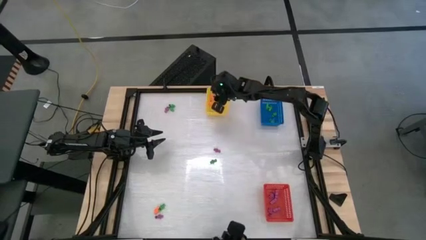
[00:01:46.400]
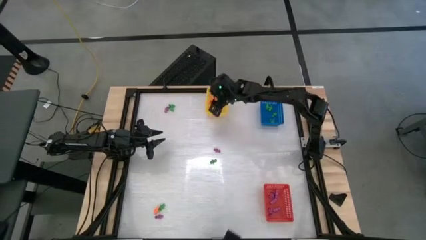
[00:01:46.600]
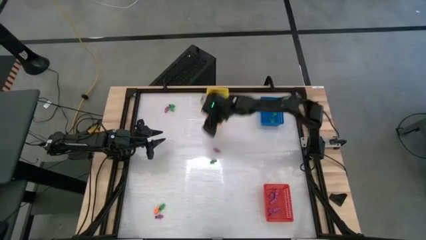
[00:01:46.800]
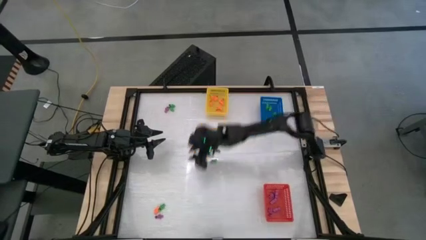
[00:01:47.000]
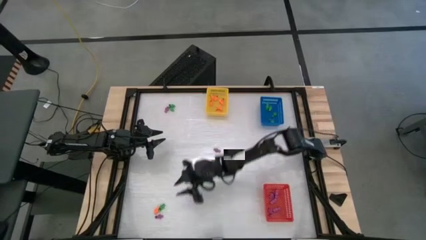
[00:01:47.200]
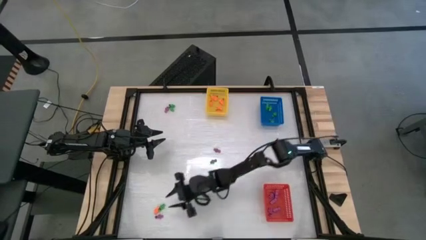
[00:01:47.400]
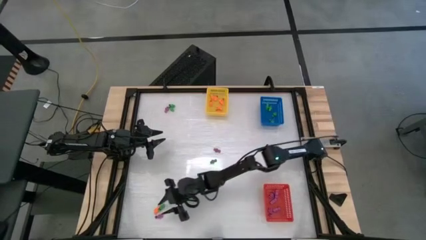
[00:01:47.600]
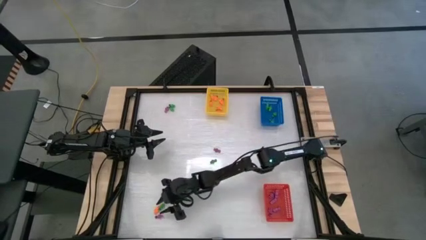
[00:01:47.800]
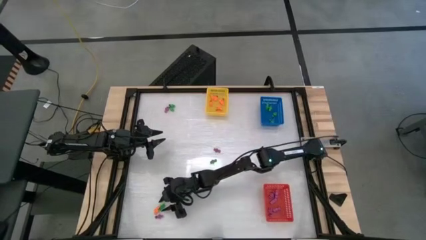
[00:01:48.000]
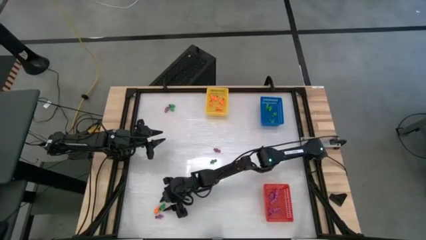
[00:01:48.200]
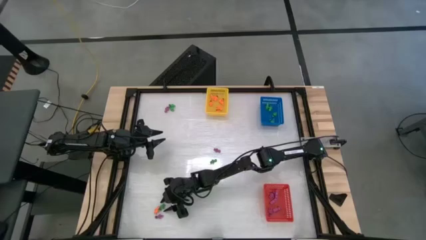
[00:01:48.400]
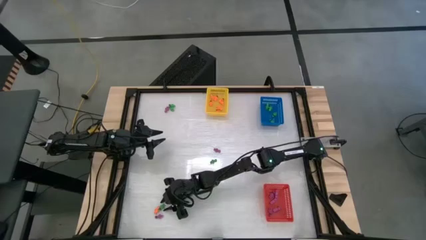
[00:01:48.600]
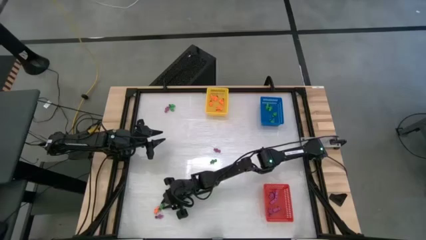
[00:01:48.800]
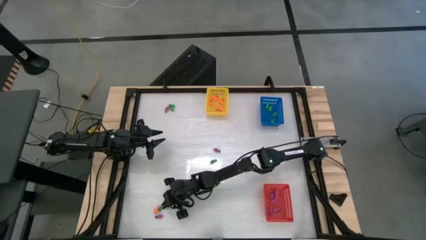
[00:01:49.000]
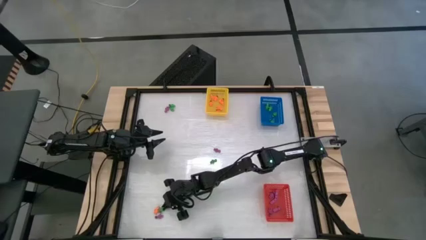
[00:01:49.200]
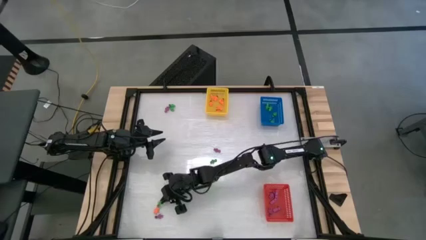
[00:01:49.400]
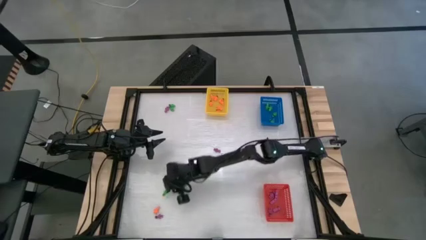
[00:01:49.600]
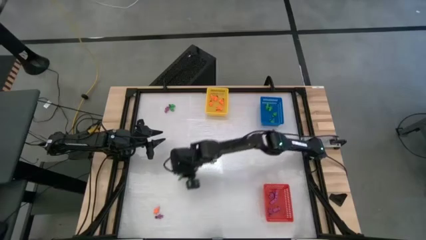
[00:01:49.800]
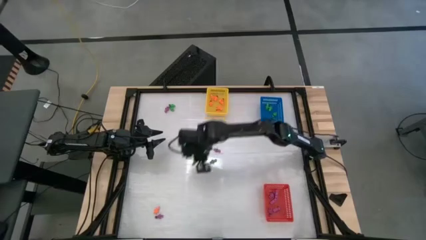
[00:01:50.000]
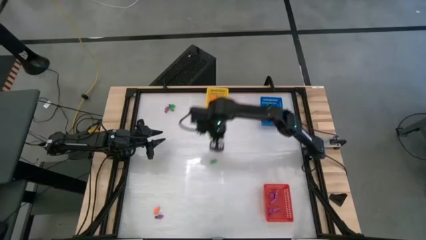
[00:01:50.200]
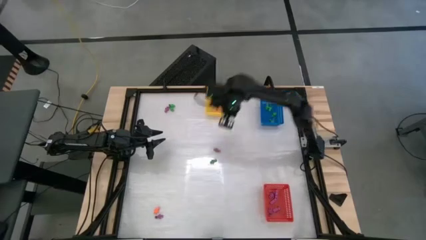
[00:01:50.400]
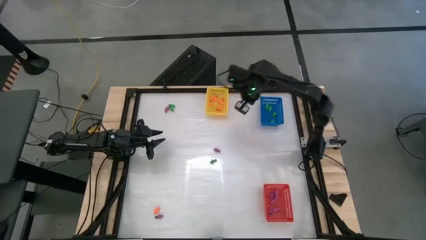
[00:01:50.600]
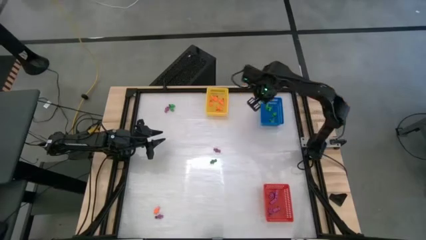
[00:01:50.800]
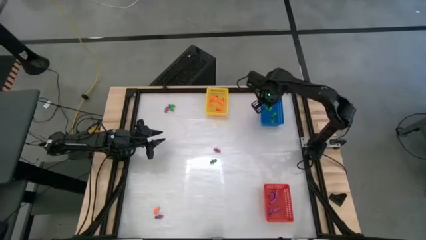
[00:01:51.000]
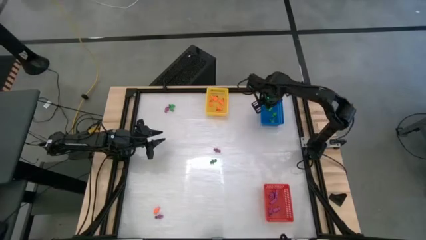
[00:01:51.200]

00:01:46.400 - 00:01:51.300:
Task: Sort Halloween decoration
Put the green skeleton toy into the blue bin

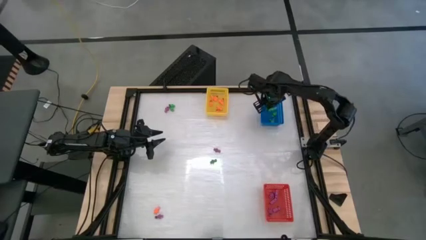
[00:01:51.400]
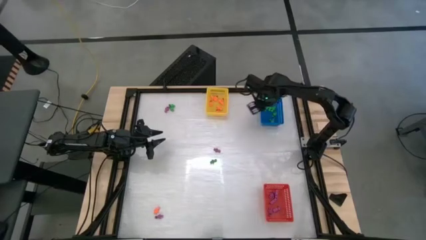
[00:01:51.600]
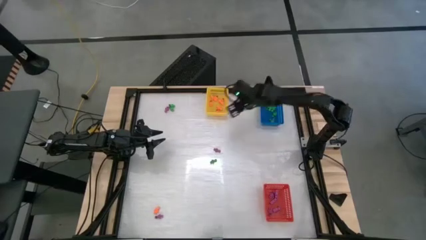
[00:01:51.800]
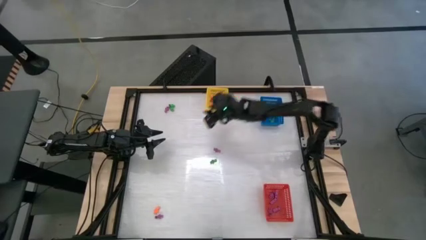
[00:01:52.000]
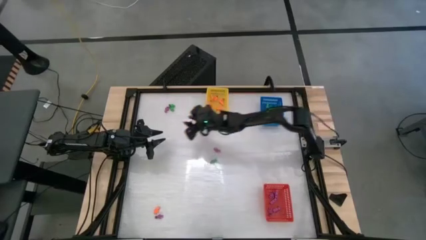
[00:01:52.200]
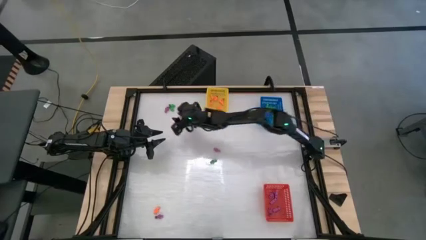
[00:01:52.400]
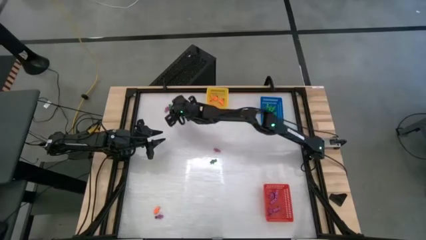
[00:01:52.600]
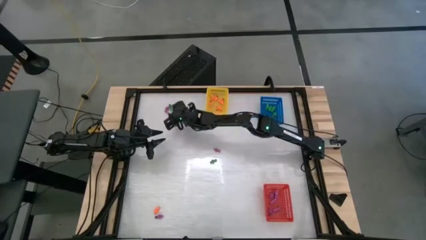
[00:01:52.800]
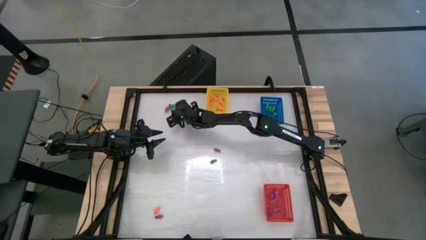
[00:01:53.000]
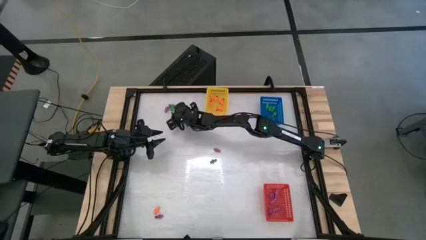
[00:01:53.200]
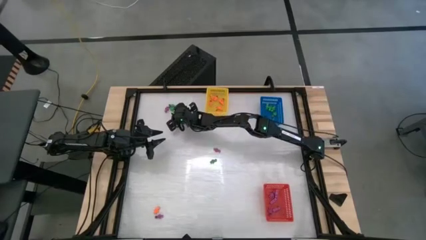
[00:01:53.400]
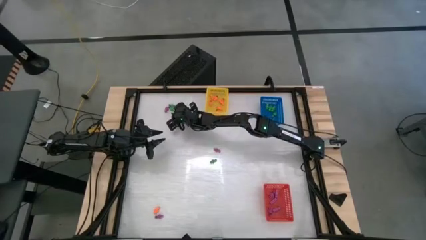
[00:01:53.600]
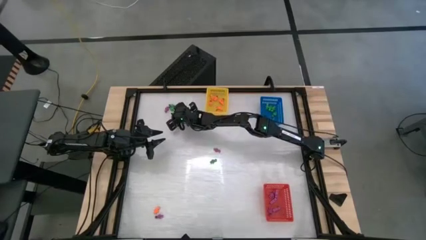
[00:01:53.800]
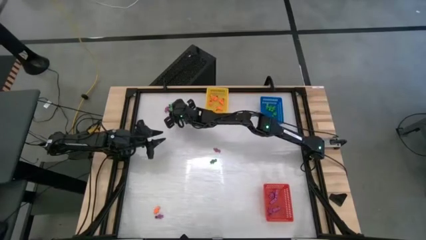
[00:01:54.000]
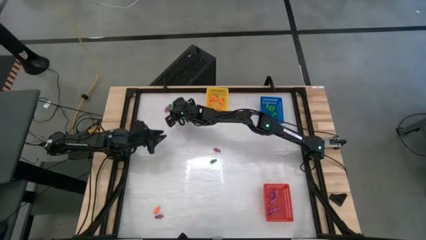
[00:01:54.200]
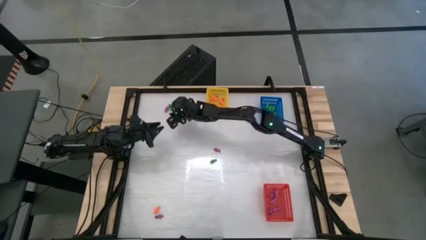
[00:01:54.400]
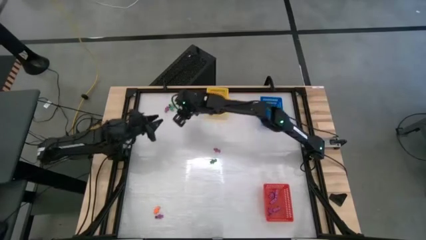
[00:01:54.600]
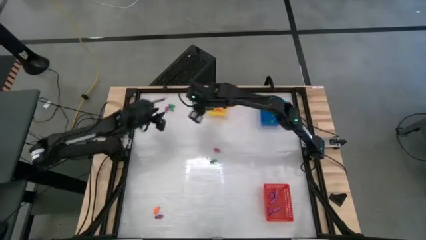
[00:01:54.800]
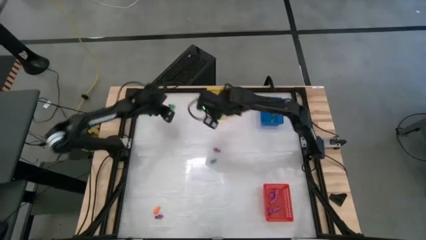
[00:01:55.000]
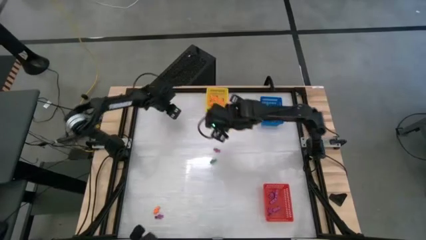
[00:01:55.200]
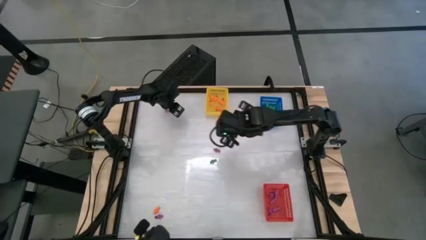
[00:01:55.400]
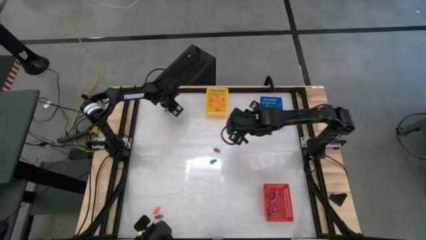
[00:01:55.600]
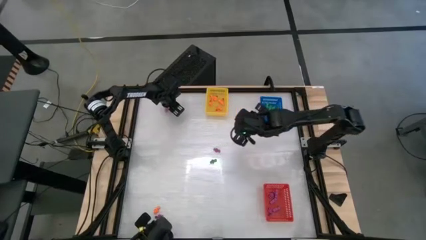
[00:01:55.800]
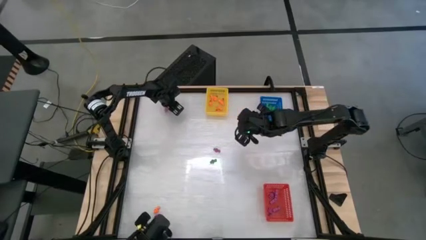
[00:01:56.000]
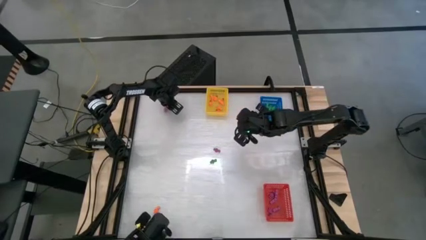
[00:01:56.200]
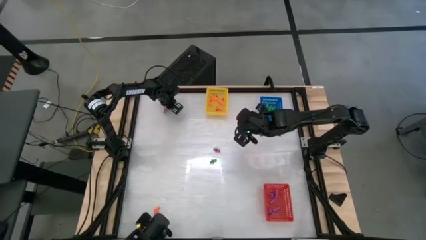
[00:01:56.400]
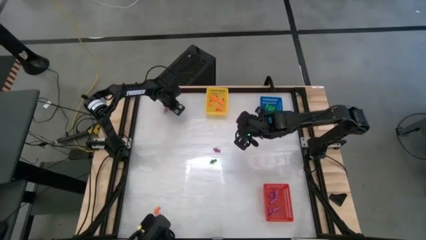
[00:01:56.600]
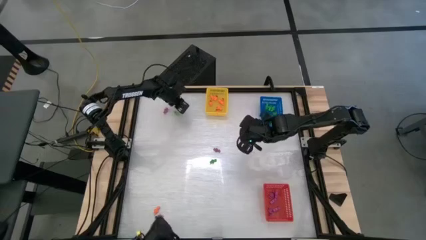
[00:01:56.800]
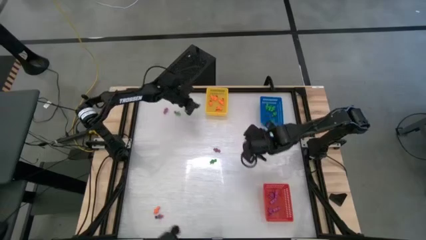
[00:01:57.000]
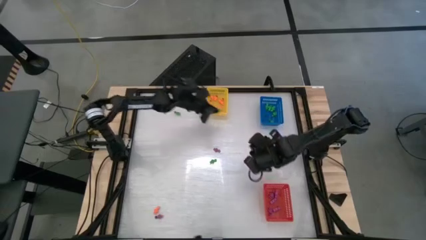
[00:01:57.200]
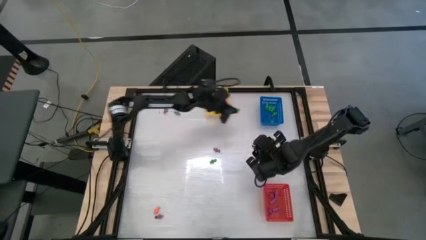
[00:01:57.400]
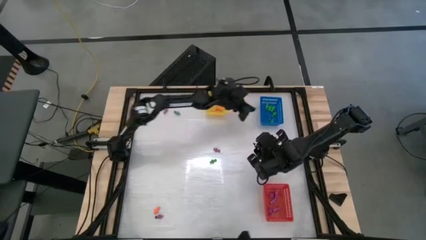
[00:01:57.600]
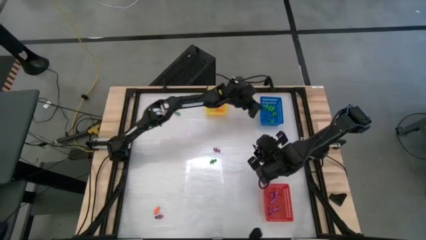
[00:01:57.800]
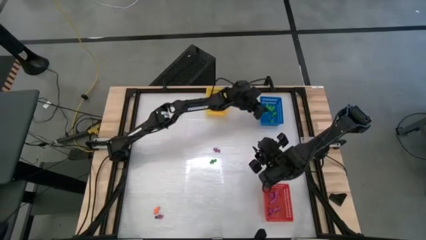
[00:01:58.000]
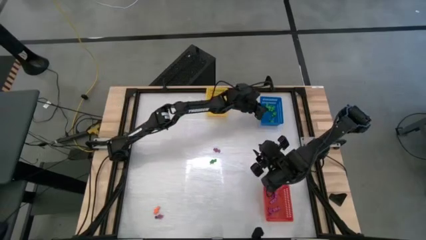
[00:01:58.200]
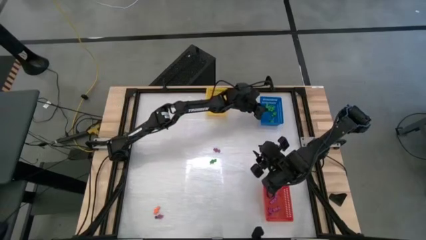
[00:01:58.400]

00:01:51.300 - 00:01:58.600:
Put the green skeleton toy into the blue bin

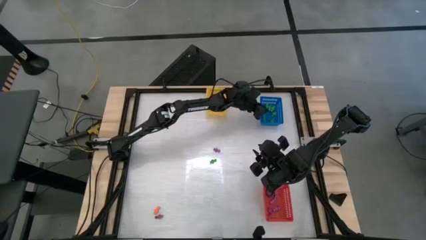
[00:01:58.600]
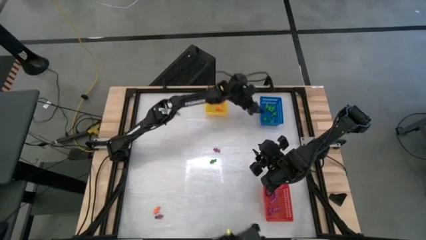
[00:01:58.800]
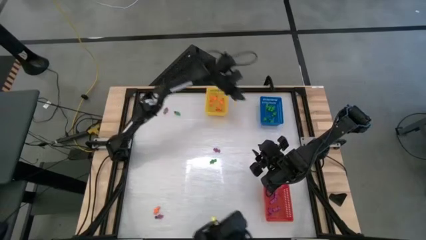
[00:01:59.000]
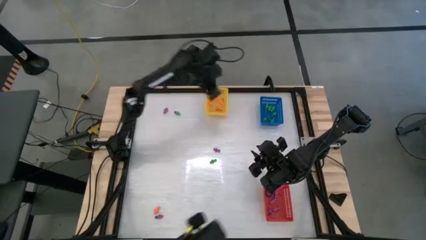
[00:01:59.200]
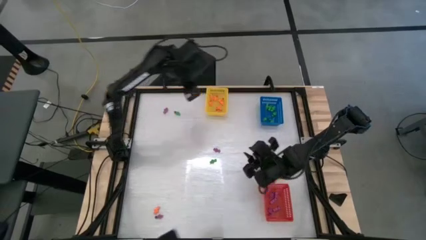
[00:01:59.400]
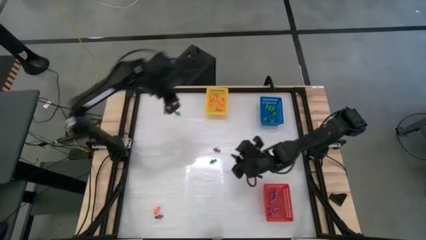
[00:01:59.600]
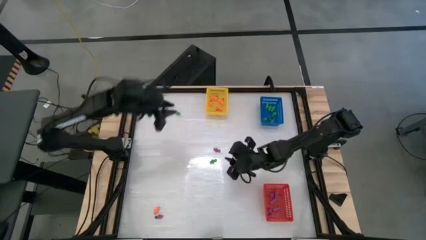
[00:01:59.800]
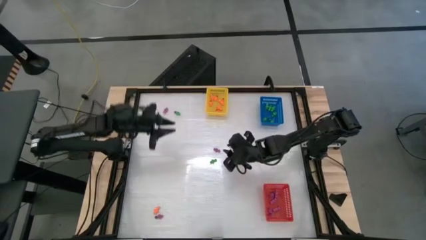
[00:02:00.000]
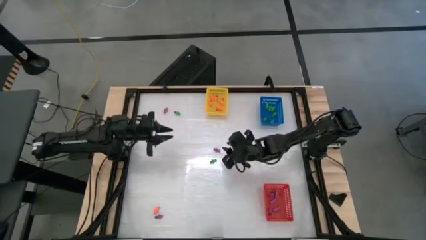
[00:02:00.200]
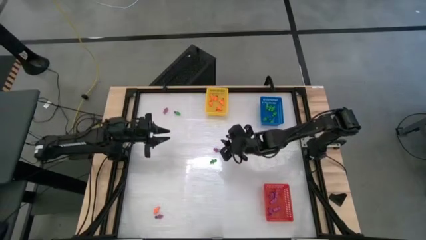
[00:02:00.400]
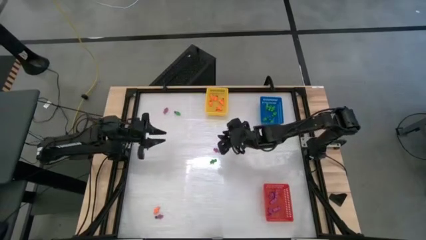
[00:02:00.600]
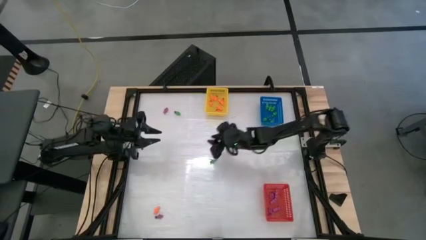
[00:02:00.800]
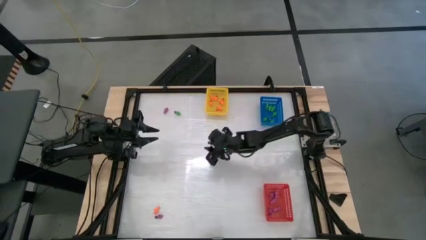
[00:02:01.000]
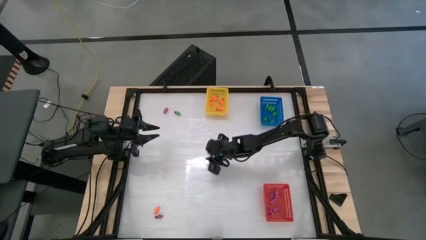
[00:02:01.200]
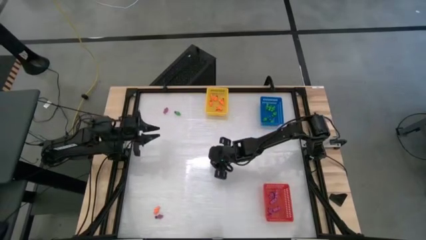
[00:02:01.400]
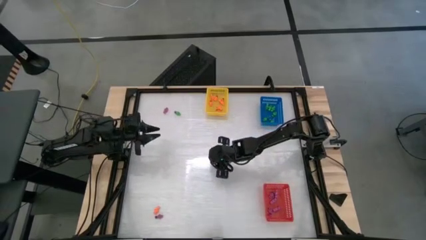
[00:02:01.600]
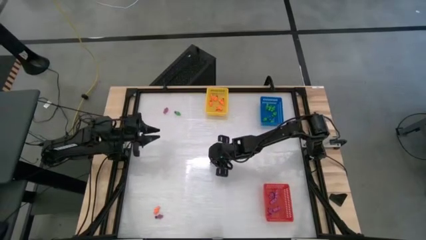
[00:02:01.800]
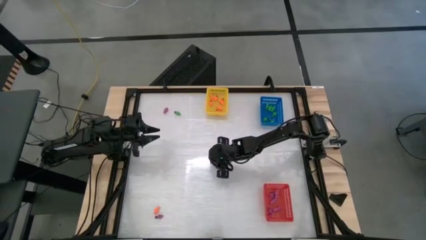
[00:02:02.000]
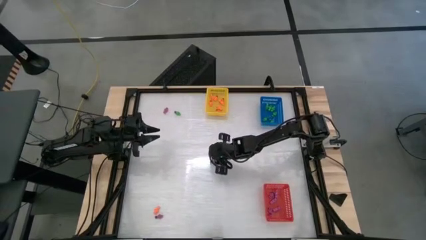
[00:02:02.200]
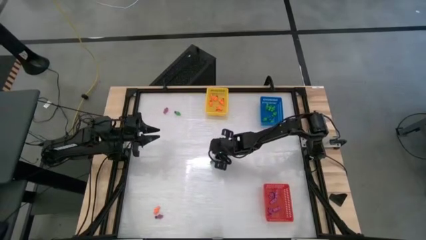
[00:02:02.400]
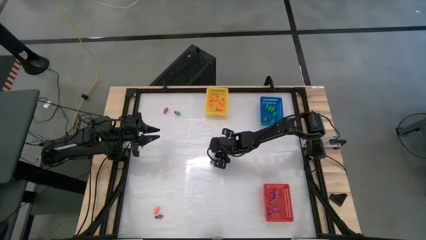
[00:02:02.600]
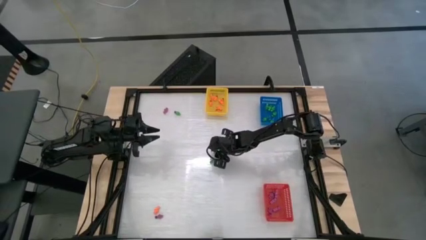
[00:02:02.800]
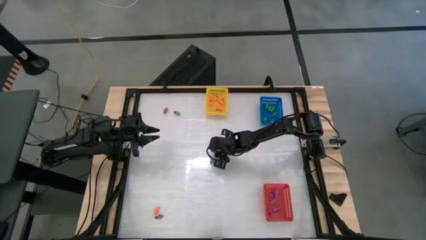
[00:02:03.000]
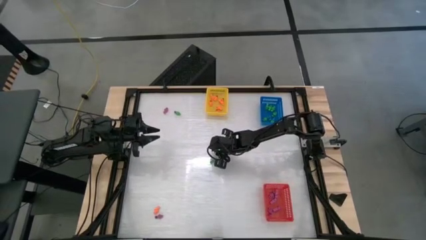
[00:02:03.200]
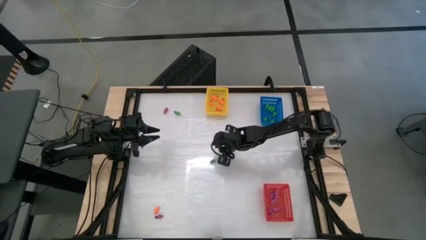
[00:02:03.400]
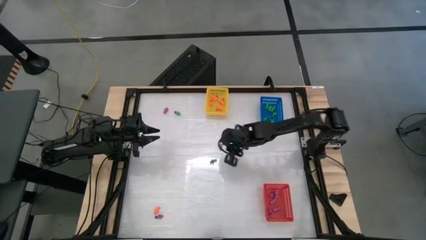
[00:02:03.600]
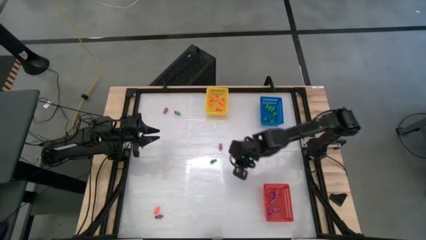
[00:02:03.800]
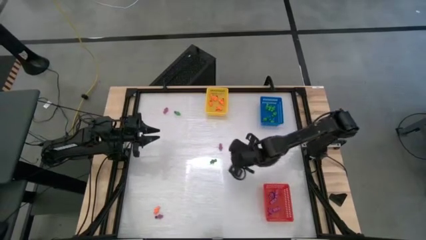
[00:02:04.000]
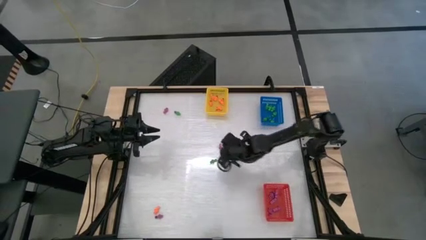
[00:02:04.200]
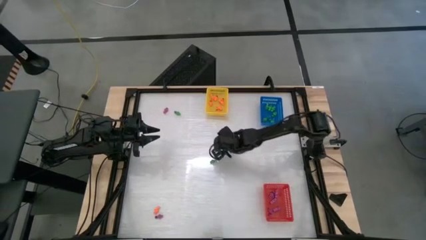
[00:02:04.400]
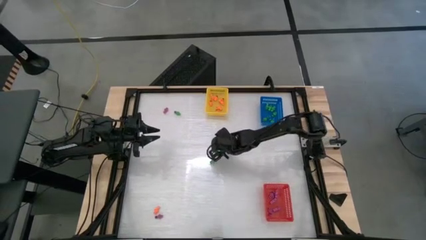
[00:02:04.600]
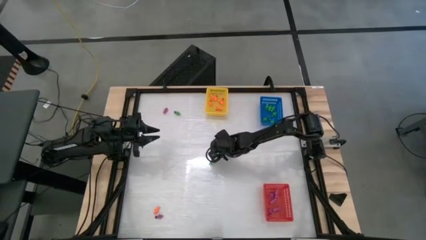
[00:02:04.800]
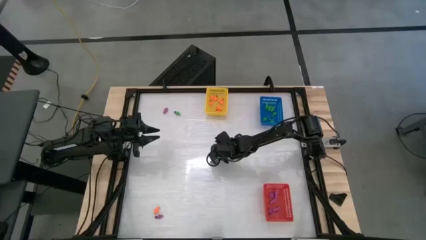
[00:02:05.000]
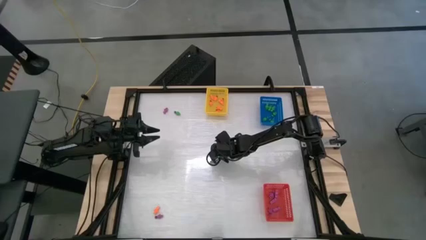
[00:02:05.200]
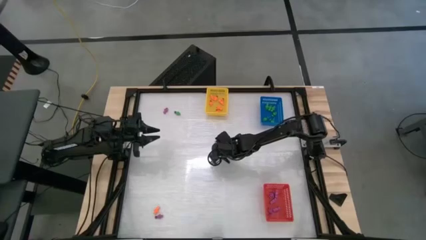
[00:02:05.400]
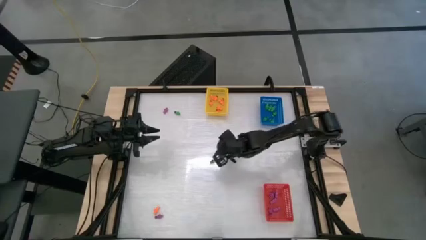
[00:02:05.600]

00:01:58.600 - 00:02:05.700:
Put the violet skeleton toy into the red bin
